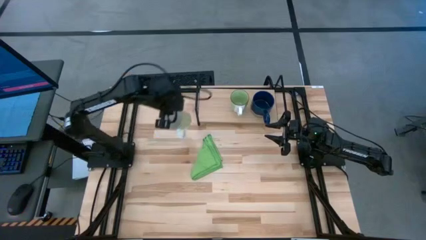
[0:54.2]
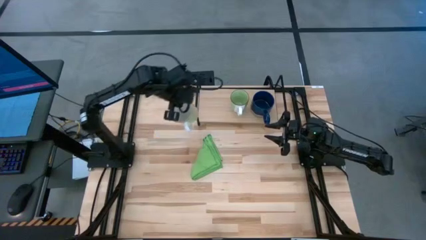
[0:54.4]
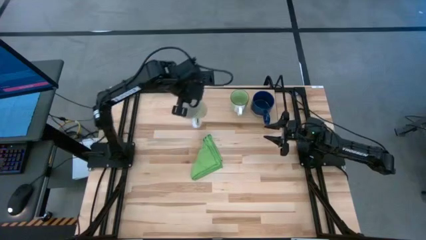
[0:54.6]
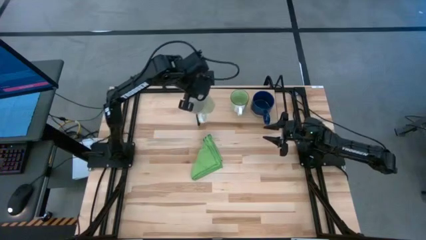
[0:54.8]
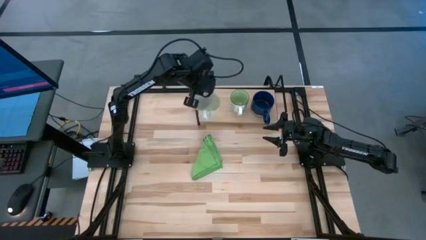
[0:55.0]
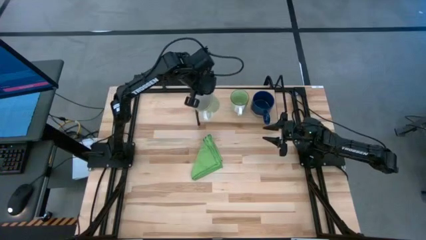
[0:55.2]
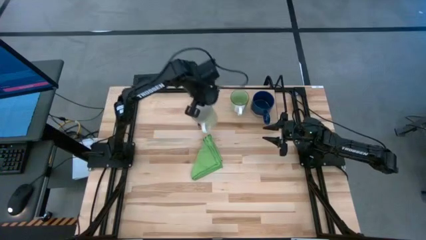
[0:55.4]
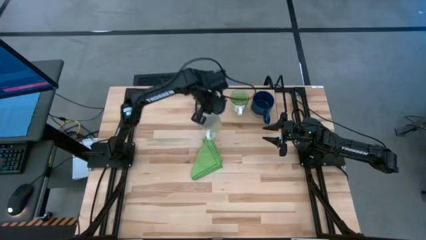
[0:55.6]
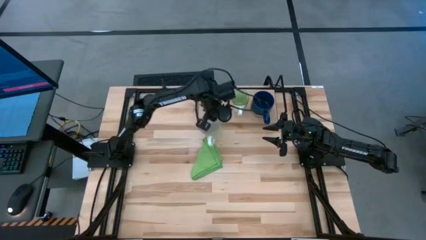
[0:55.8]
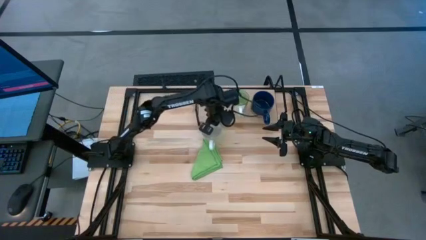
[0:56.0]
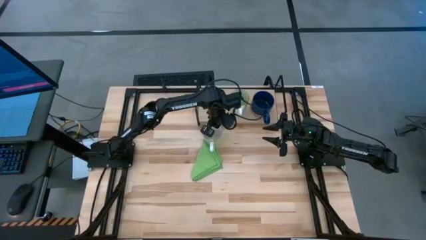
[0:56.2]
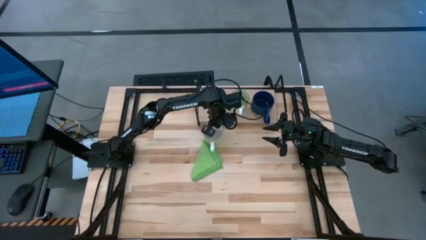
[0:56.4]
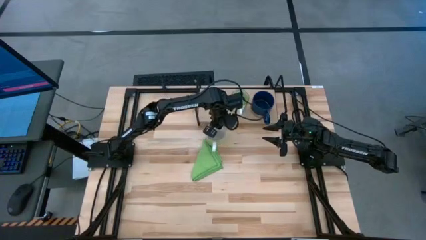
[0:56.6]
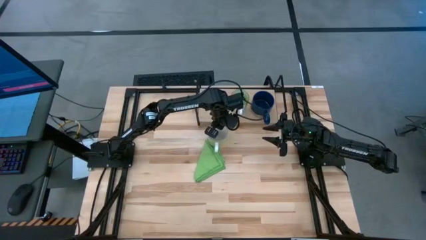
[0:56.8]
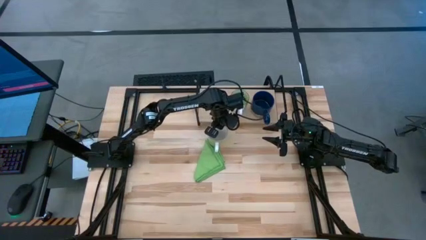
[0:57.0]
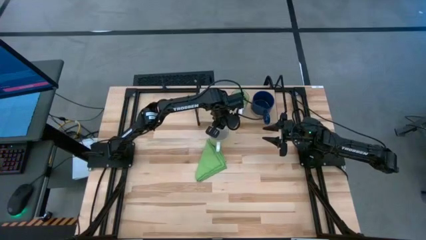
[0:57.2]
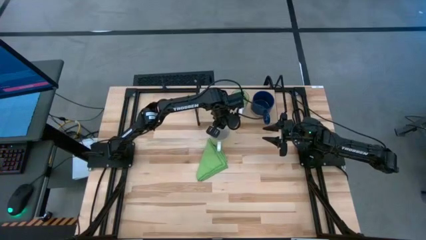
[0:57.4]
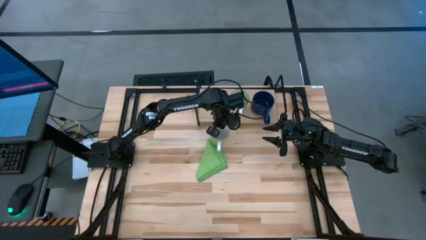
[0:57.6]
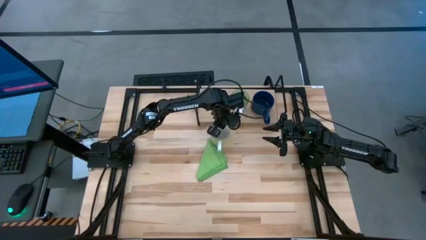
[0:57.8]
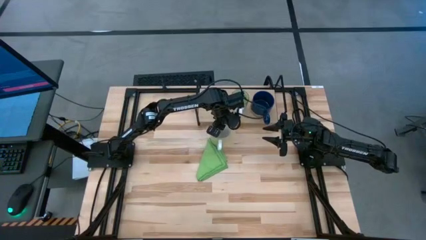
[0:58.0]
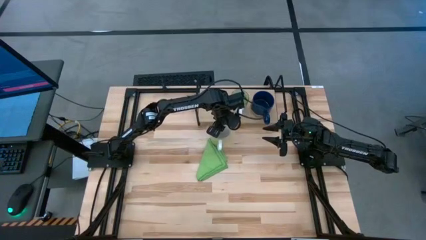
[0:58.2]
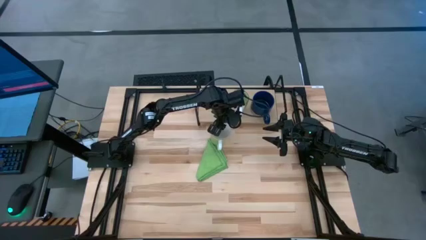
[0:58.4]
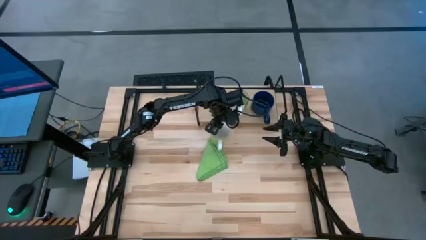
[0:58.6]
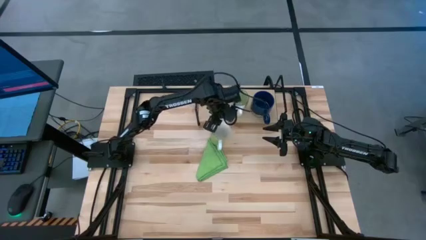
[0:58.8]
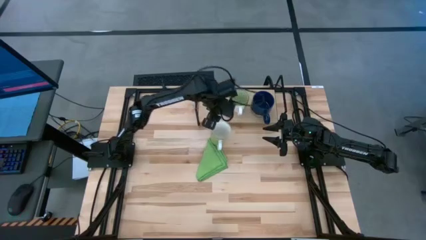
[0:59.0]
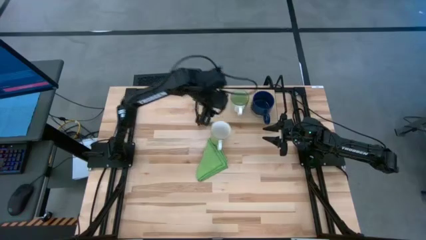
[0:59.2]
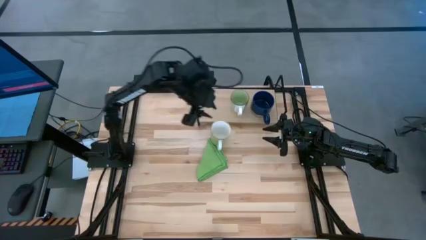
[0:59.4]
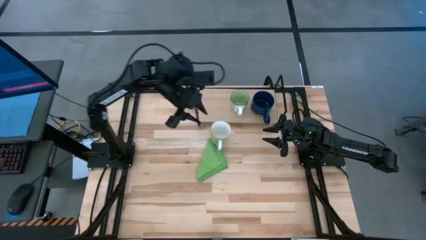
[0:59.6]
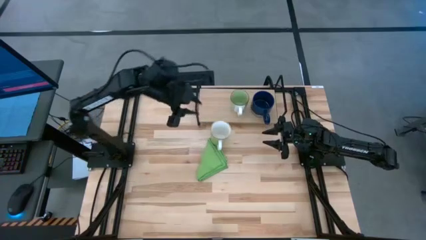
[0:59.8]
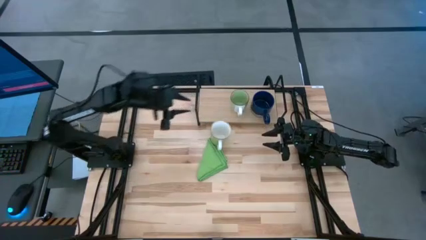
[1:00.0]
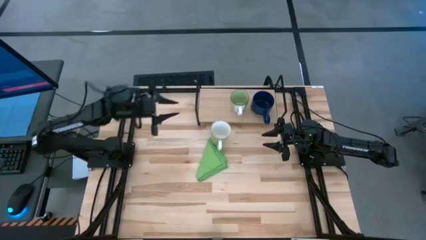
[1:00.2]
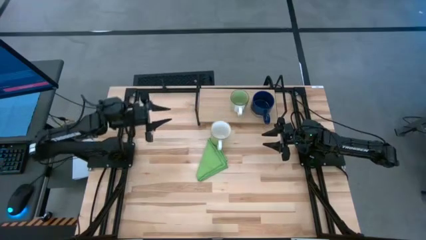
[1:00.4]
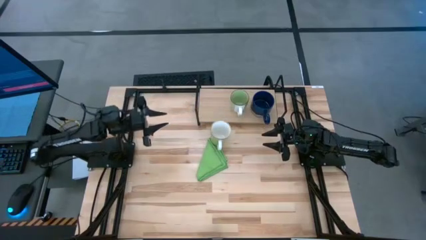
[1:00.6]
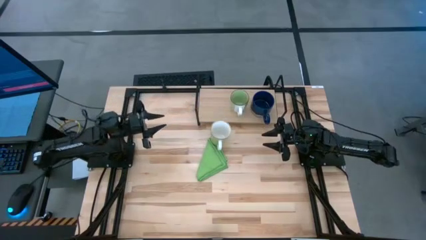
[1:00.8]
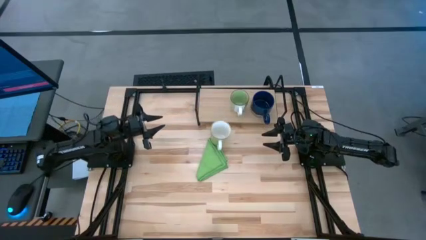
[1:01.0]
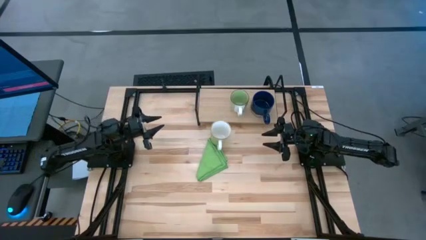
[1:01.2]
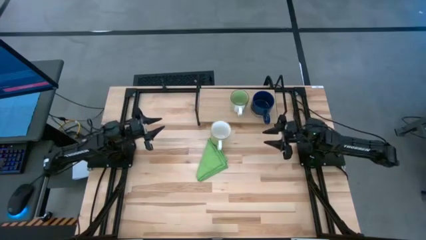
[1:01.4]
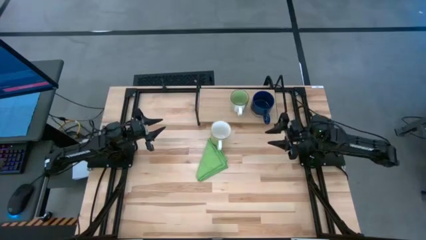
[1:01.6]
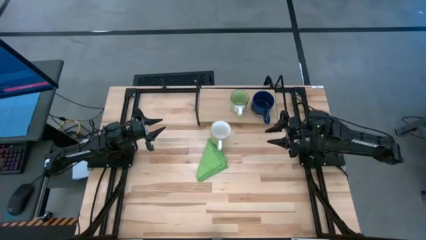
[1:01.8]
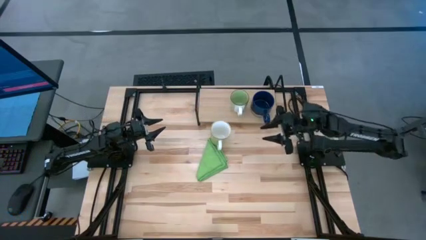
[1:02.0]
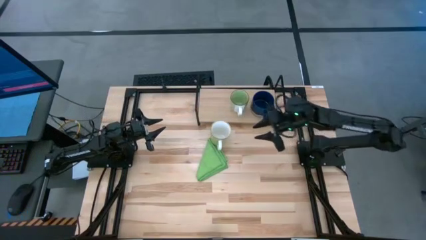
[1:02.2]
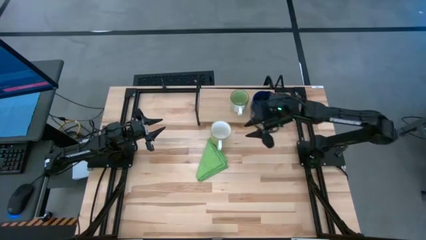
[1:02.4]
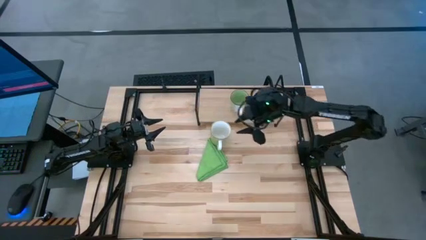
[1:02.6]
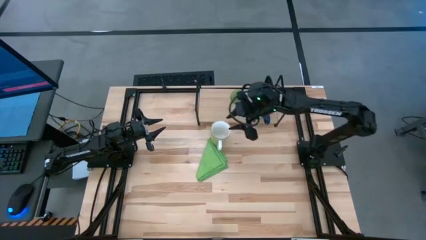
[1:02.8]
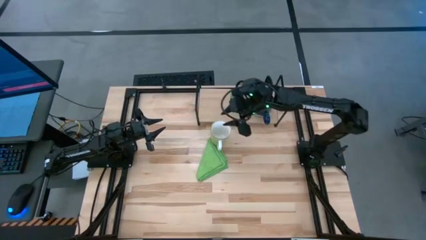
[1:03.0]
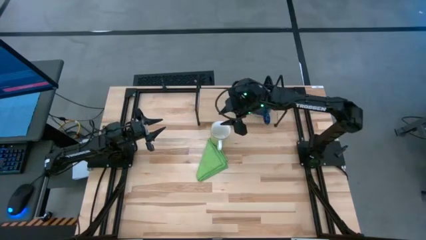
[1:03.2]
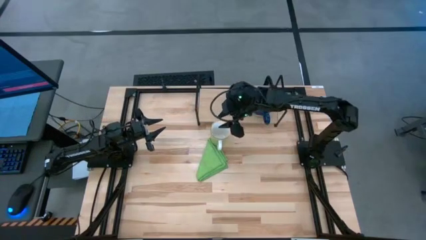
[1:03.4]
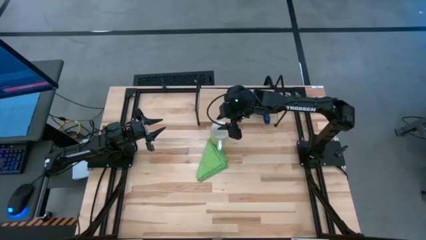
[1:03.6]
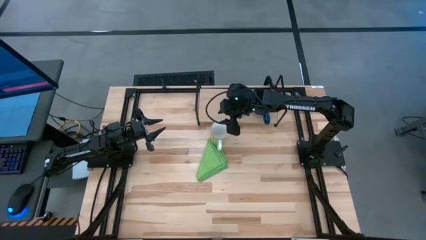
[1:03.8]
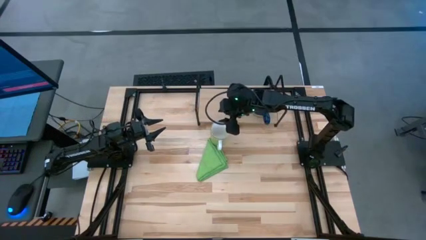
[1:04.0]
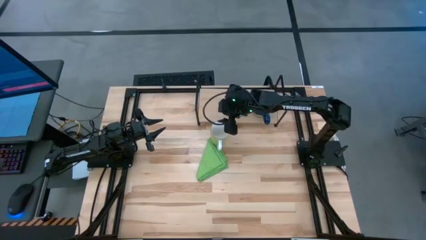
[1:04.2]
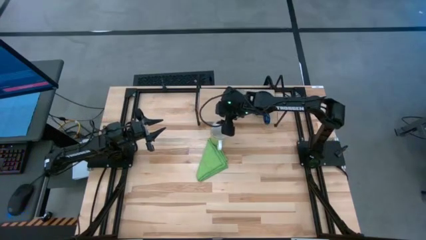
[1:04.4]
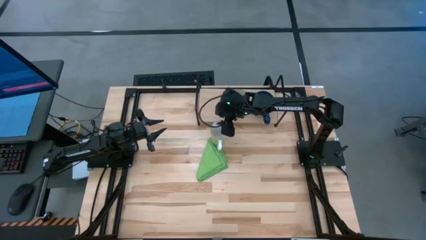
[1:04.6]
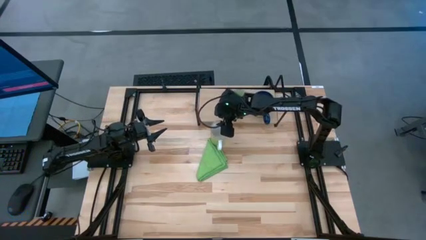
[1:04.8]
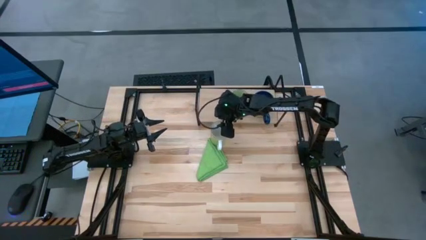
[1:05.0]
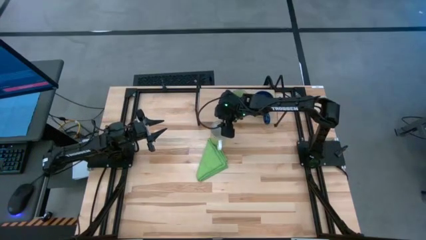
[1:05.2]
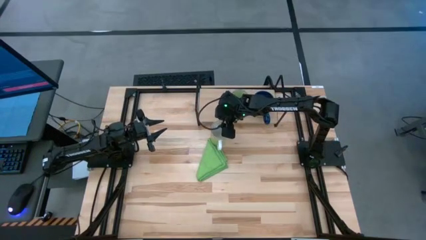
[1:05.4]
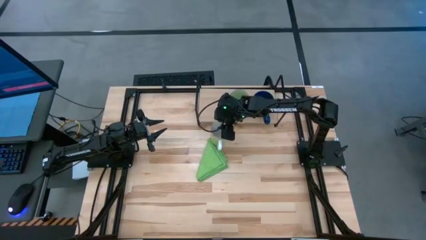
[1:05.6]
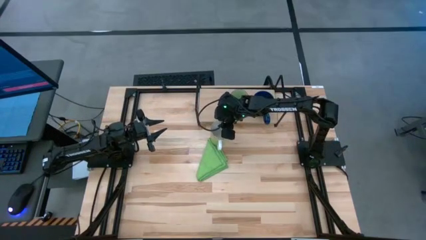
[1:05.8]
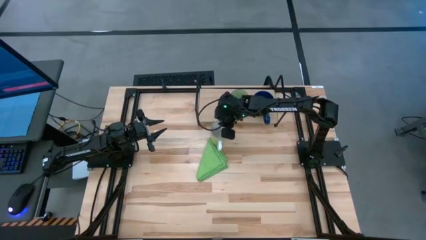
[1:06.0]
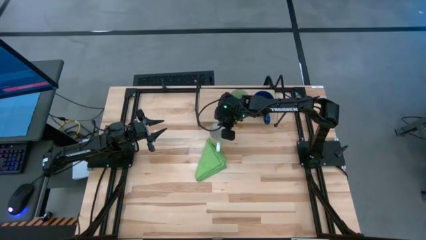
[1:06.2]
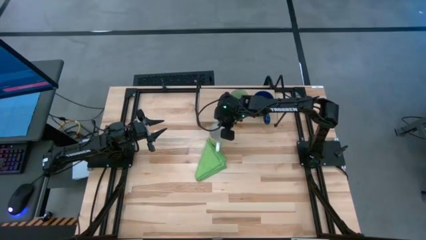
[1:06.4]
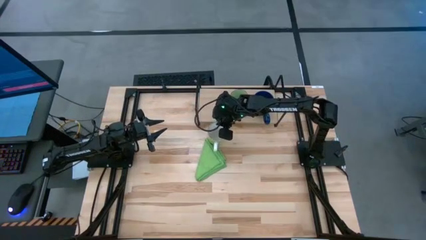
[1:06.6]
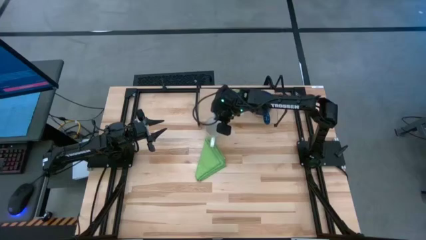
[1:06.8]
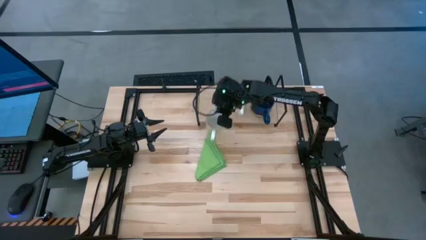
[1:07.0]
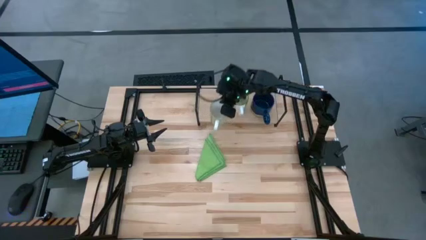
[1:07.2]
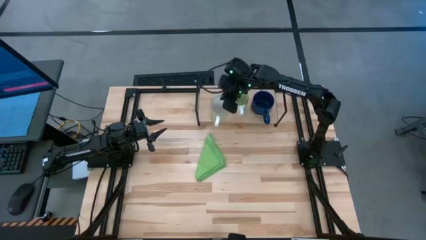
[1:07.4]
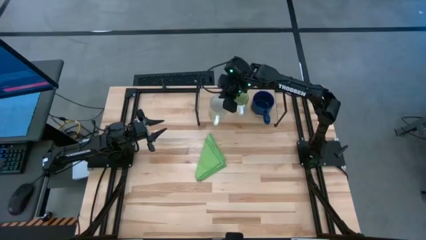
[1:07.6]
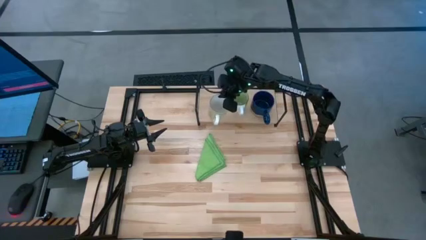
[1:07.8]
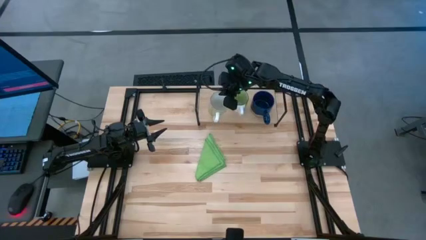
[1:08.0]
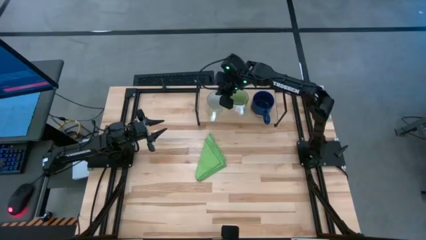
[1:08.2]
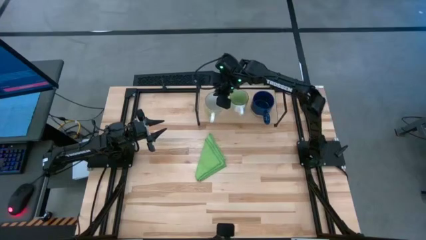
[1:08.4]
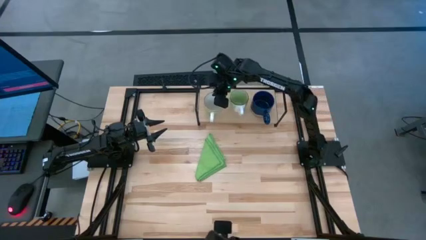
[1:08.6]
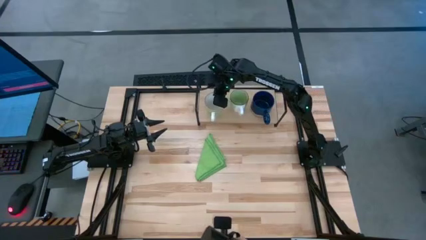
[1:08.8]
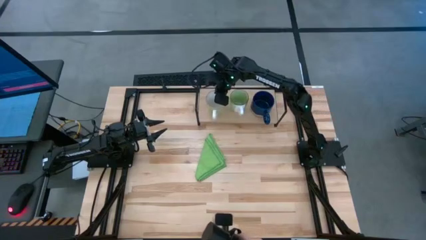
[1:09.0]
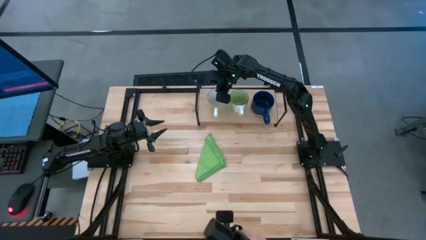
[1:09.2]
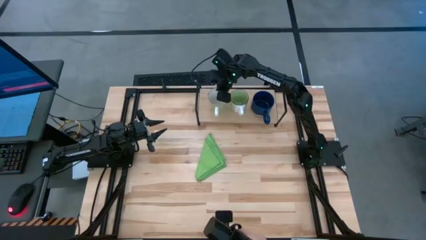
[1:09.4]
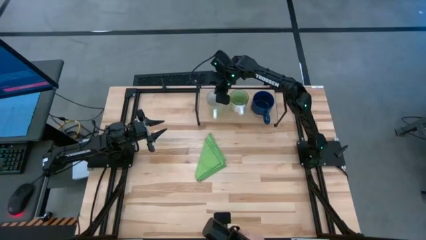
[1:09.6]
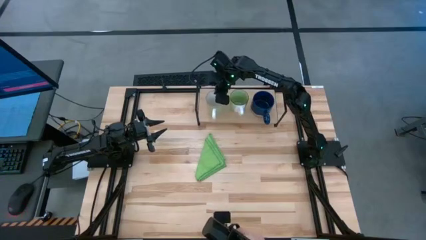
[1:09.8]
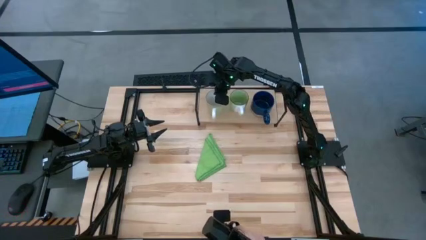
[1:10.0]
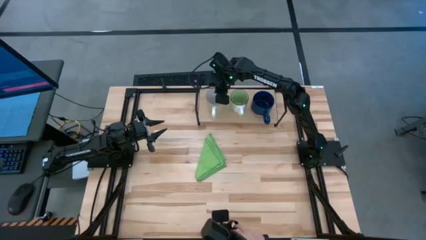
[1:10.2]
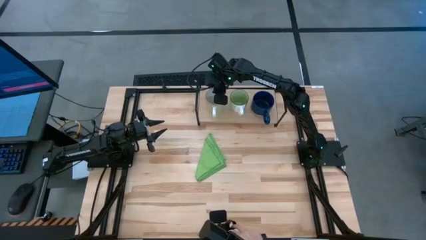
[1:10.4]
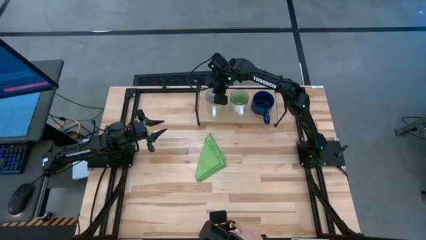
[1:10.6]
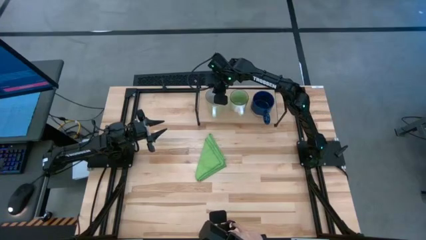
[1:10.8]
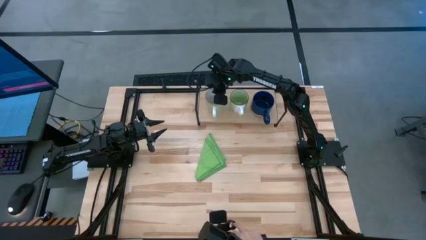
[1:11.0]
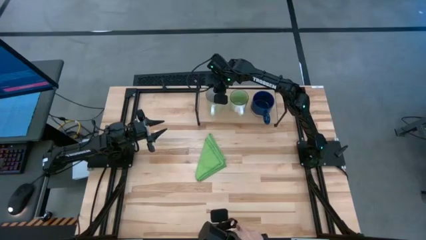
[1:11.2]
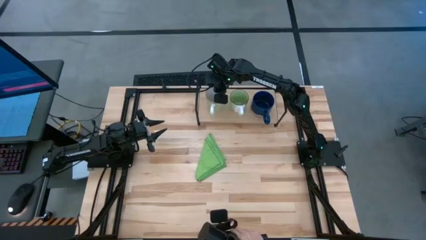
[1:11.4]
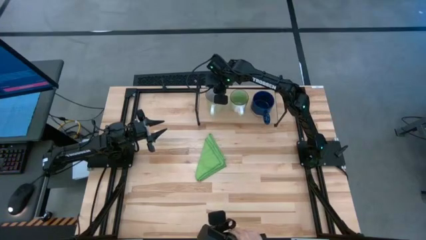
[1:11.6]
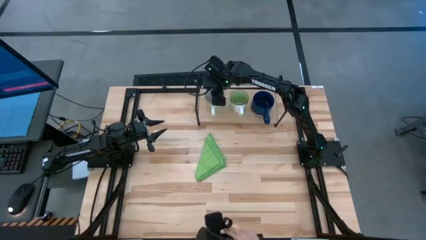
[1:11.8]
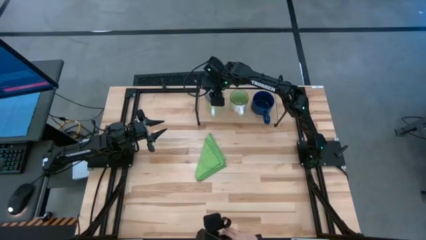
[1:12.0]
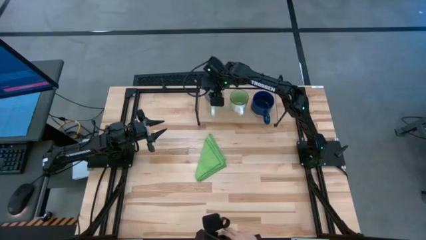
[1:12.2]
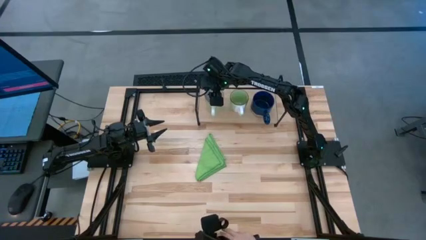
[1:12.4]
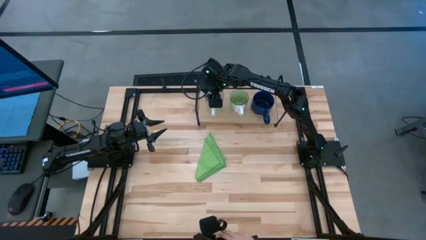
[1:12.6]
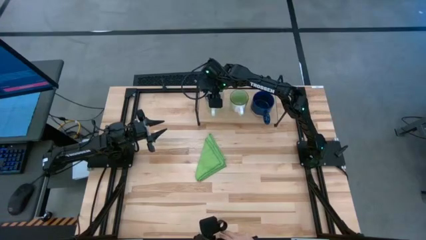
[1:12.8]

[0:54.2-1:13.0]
Task: Stack small to large cups/mugs on shelf
Put the light green mug on the shelf
